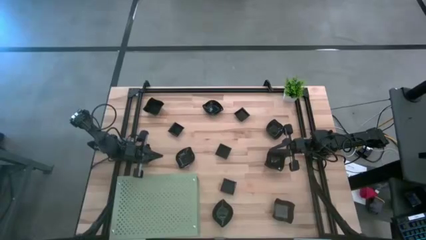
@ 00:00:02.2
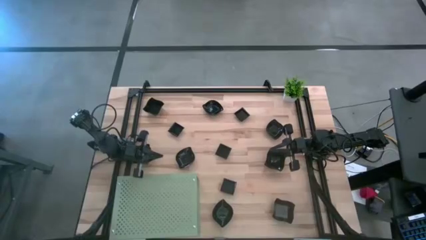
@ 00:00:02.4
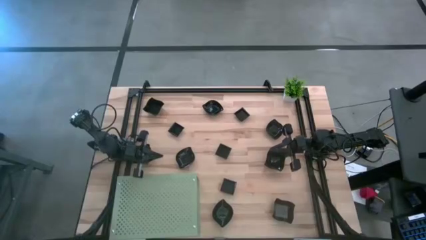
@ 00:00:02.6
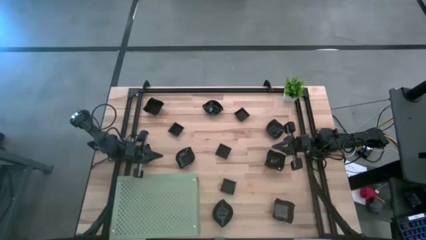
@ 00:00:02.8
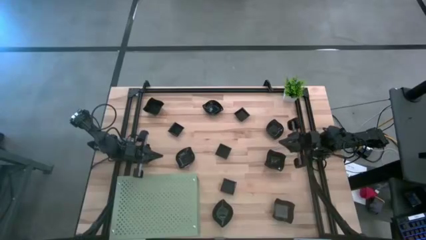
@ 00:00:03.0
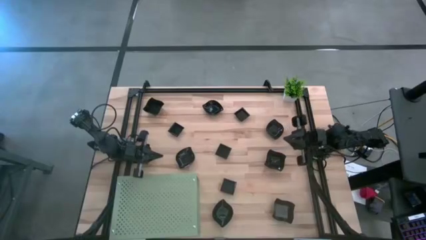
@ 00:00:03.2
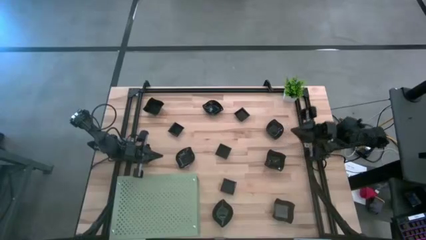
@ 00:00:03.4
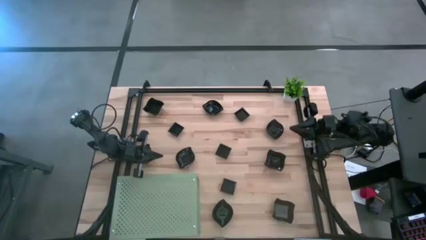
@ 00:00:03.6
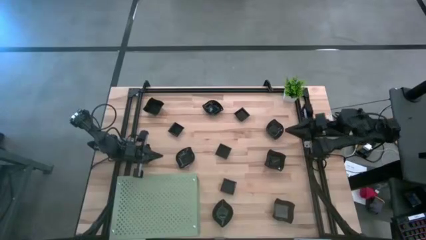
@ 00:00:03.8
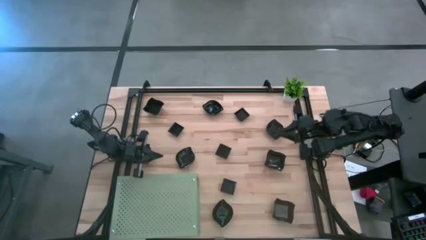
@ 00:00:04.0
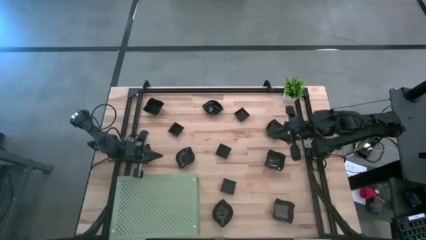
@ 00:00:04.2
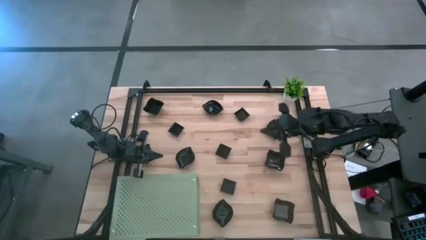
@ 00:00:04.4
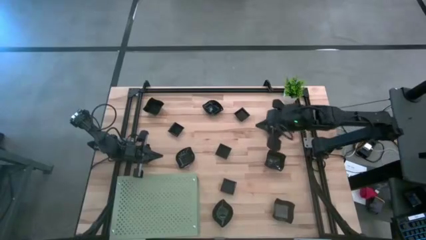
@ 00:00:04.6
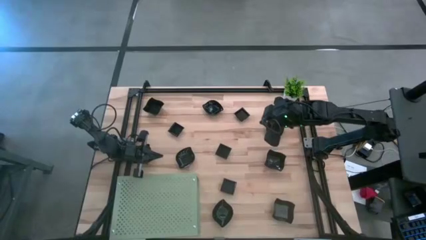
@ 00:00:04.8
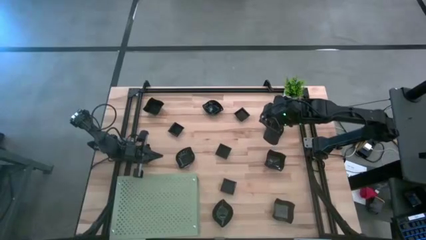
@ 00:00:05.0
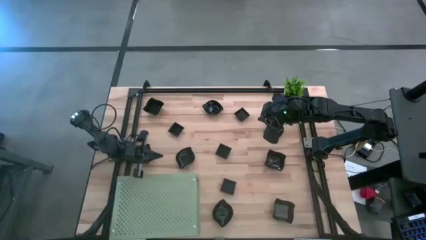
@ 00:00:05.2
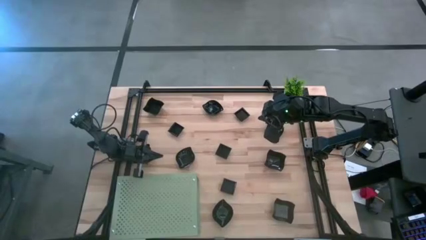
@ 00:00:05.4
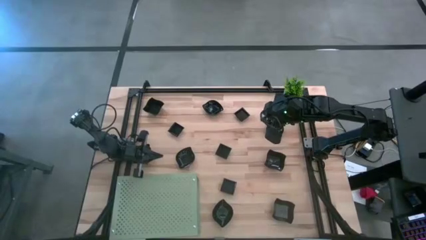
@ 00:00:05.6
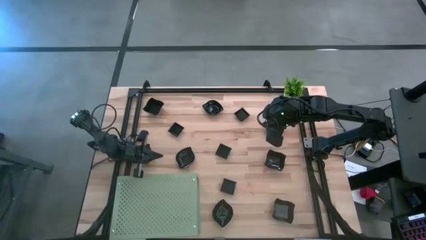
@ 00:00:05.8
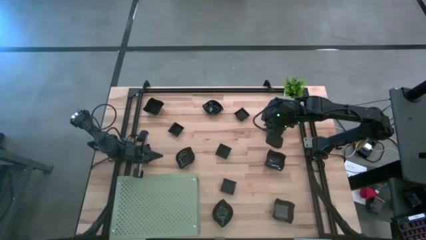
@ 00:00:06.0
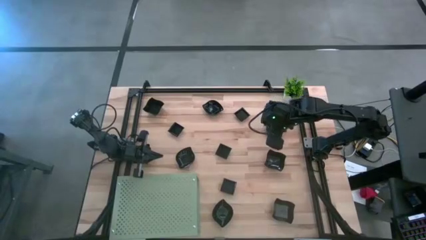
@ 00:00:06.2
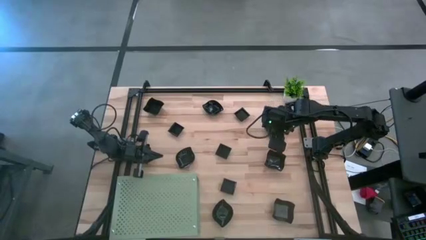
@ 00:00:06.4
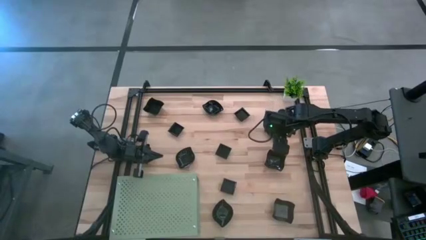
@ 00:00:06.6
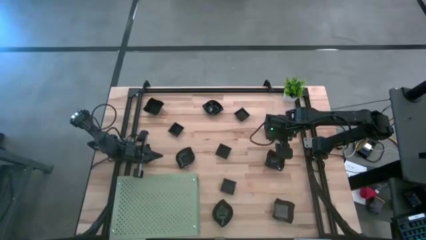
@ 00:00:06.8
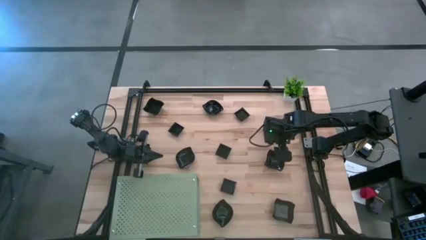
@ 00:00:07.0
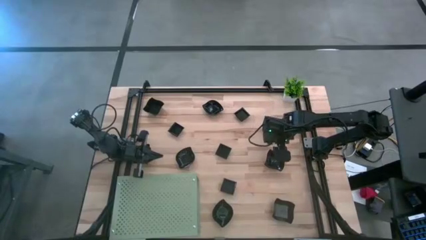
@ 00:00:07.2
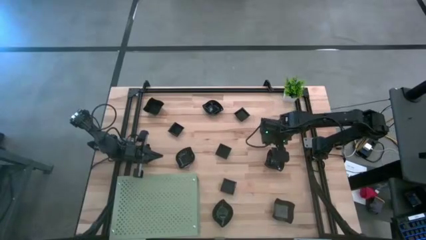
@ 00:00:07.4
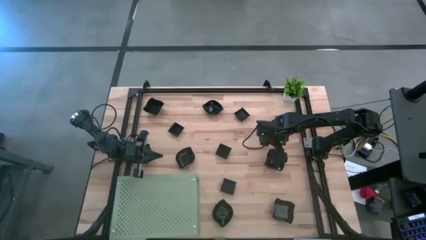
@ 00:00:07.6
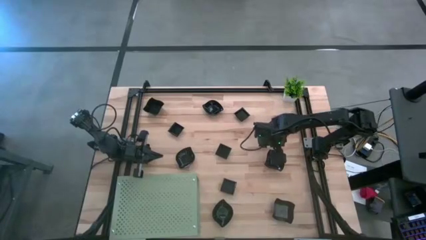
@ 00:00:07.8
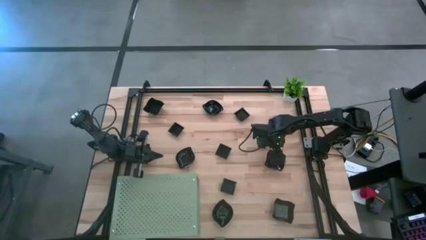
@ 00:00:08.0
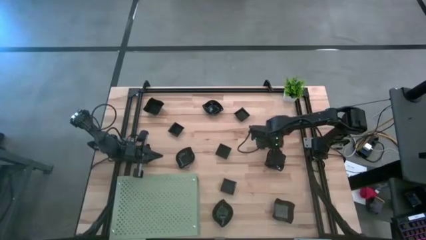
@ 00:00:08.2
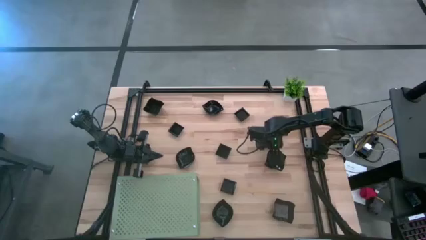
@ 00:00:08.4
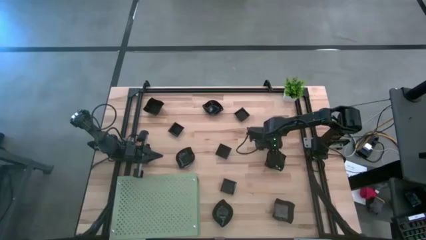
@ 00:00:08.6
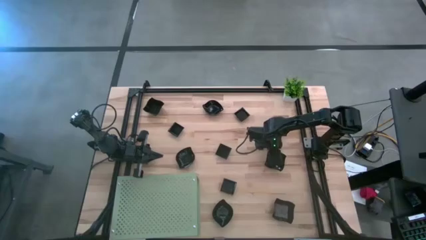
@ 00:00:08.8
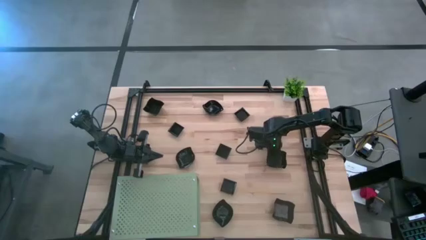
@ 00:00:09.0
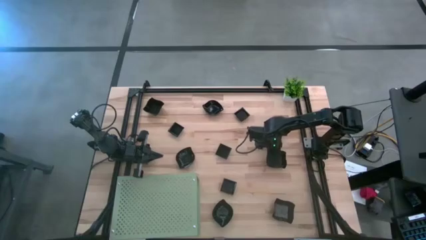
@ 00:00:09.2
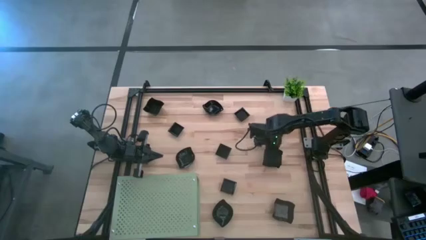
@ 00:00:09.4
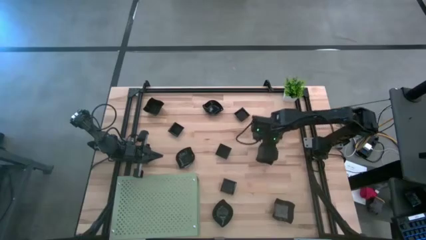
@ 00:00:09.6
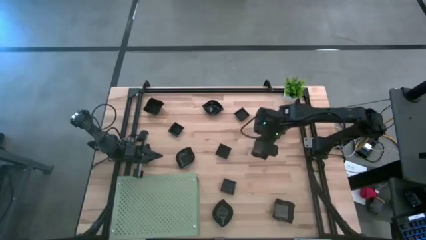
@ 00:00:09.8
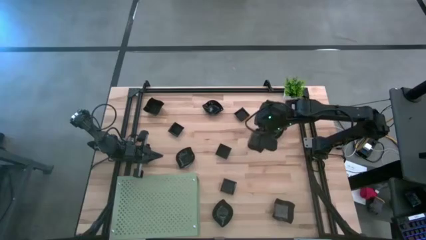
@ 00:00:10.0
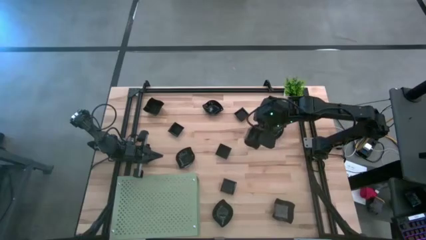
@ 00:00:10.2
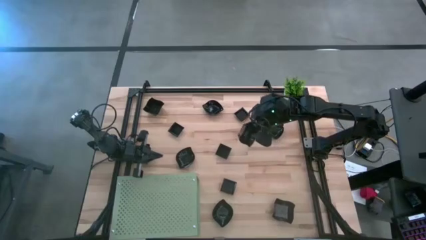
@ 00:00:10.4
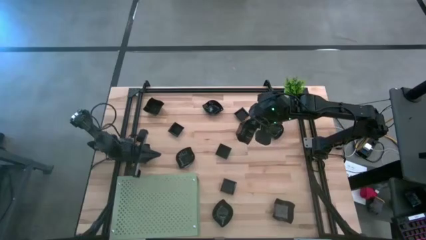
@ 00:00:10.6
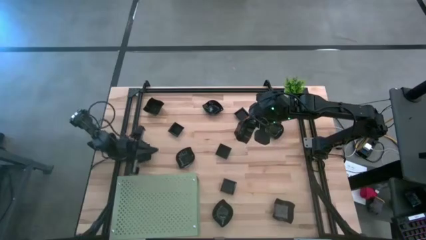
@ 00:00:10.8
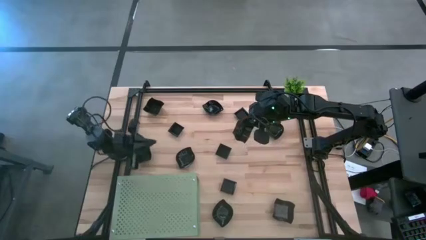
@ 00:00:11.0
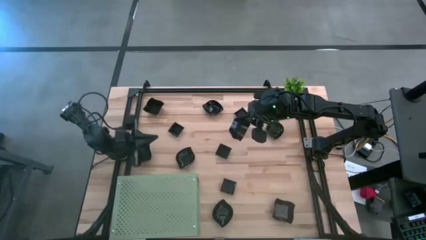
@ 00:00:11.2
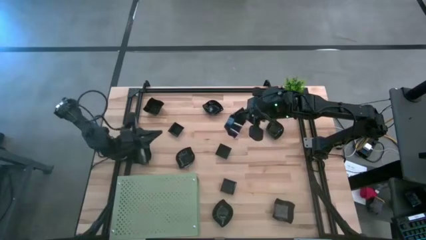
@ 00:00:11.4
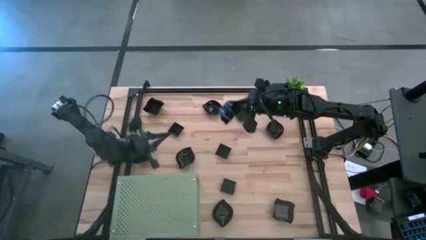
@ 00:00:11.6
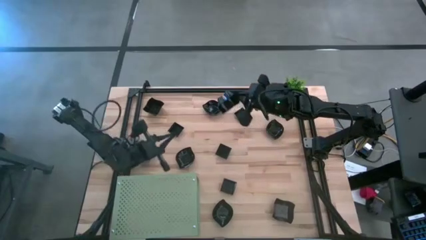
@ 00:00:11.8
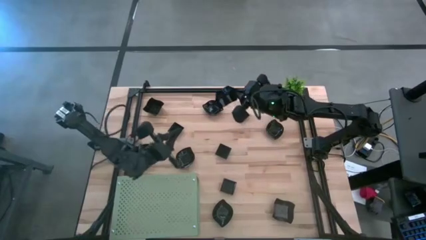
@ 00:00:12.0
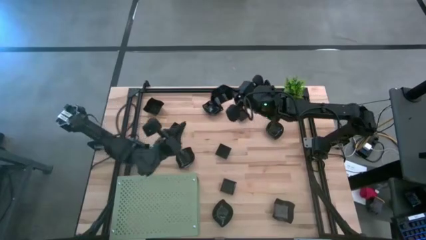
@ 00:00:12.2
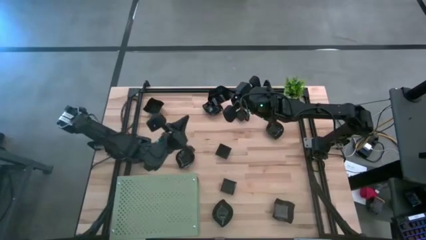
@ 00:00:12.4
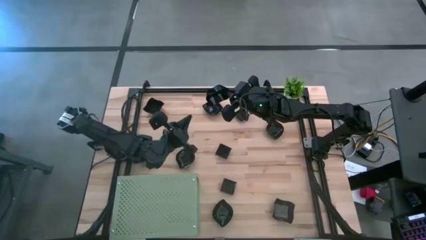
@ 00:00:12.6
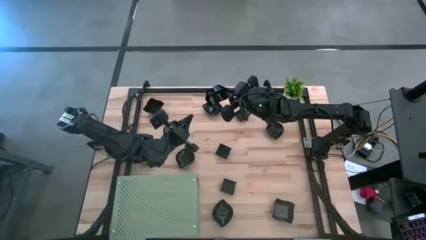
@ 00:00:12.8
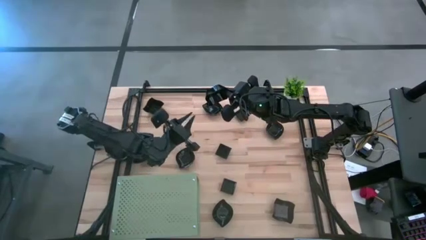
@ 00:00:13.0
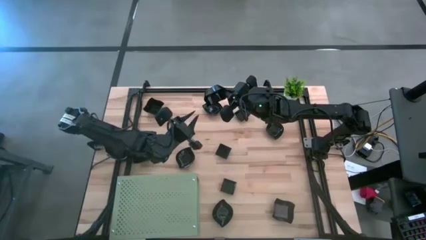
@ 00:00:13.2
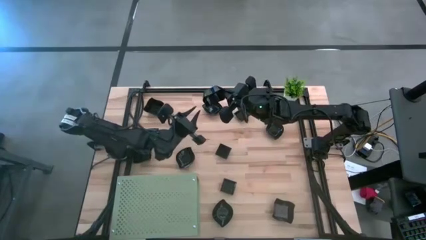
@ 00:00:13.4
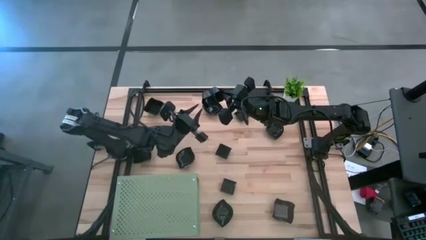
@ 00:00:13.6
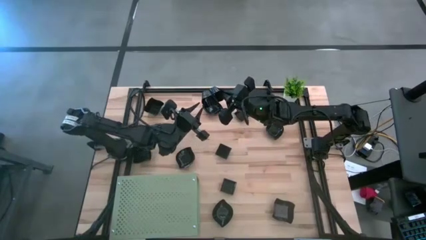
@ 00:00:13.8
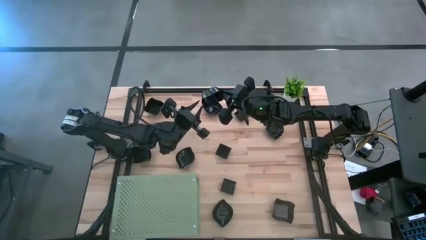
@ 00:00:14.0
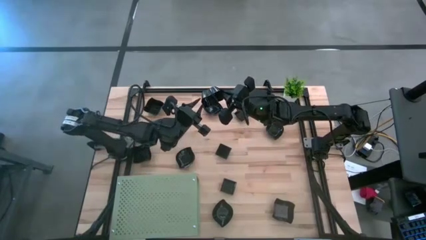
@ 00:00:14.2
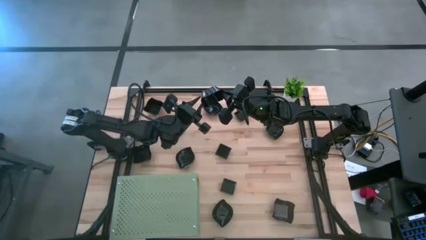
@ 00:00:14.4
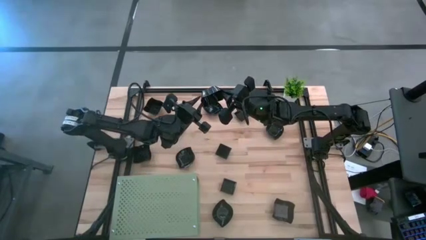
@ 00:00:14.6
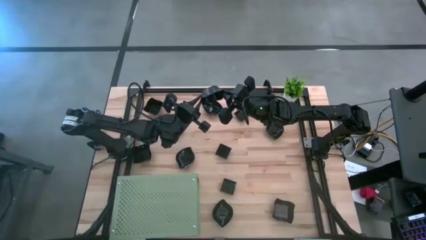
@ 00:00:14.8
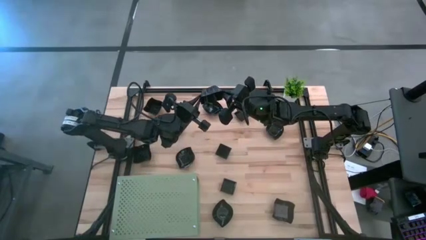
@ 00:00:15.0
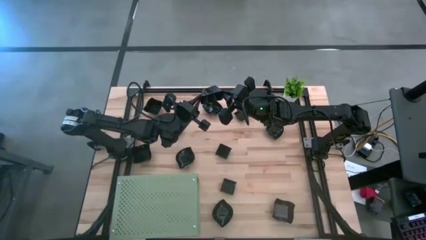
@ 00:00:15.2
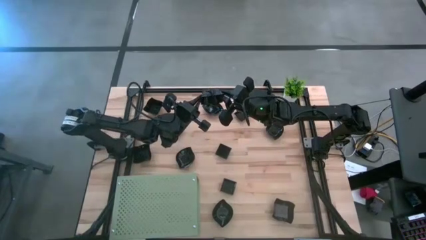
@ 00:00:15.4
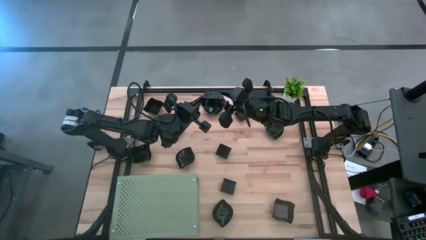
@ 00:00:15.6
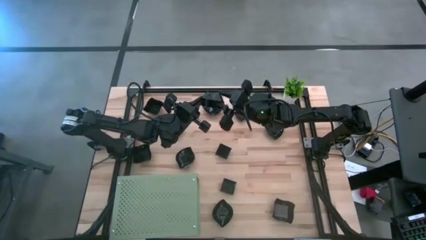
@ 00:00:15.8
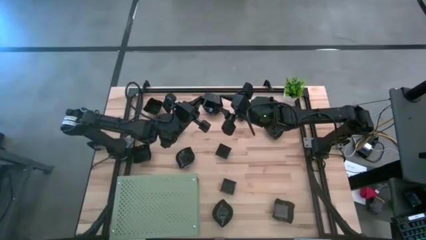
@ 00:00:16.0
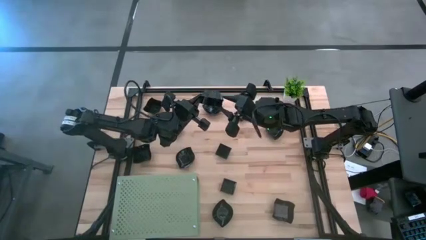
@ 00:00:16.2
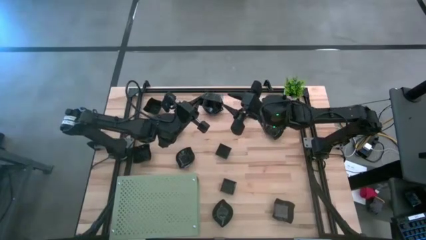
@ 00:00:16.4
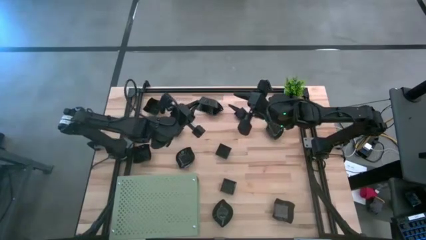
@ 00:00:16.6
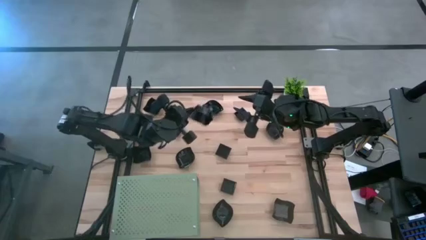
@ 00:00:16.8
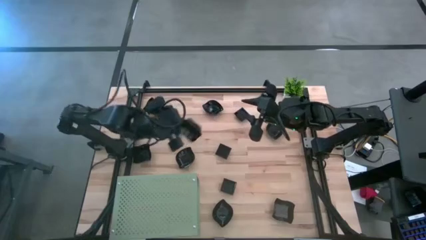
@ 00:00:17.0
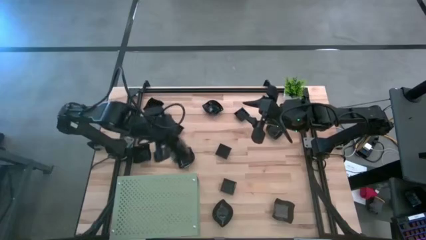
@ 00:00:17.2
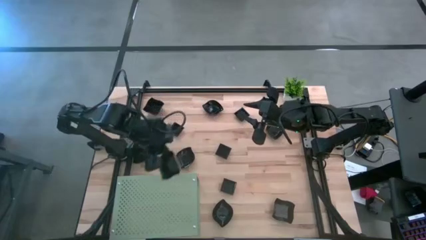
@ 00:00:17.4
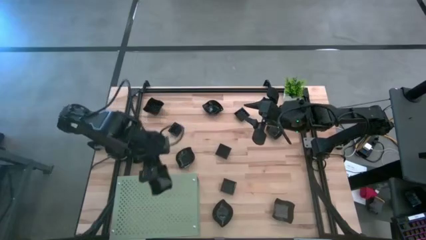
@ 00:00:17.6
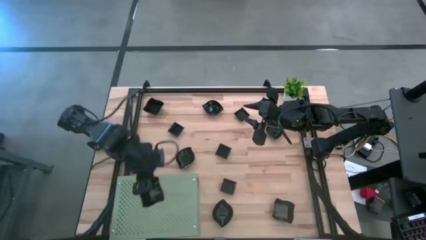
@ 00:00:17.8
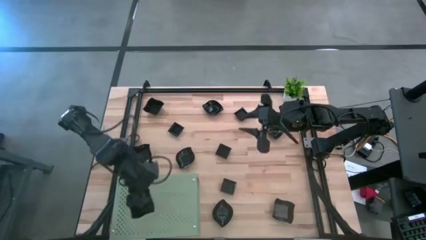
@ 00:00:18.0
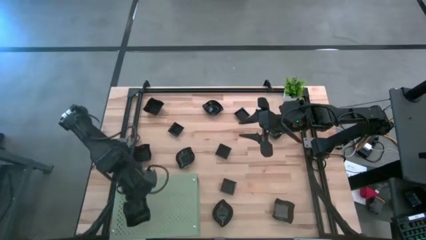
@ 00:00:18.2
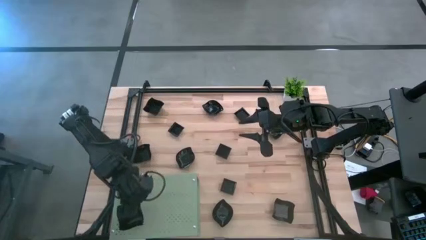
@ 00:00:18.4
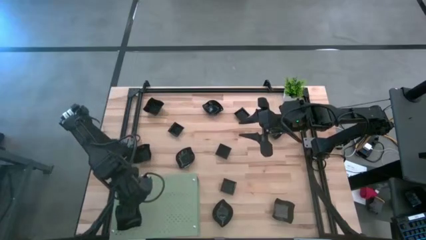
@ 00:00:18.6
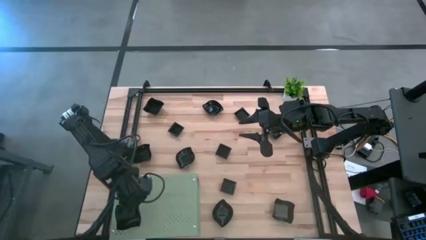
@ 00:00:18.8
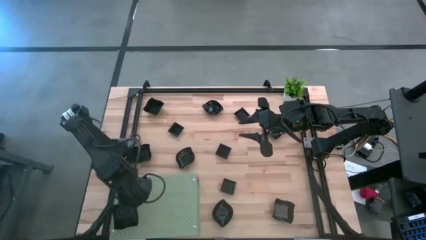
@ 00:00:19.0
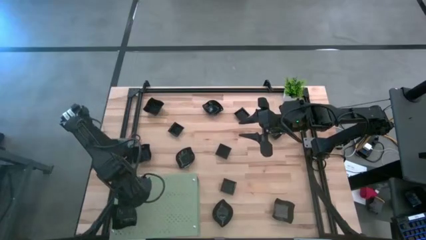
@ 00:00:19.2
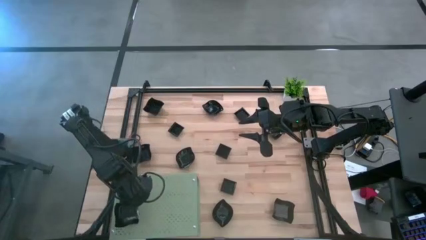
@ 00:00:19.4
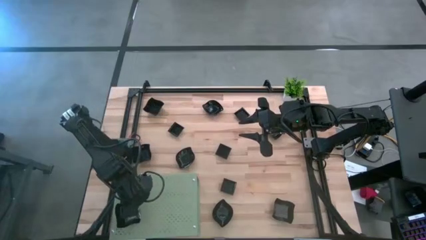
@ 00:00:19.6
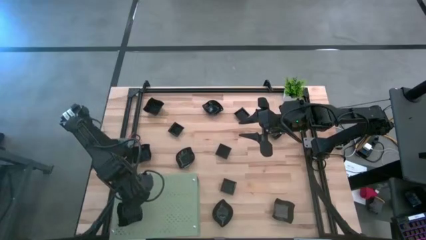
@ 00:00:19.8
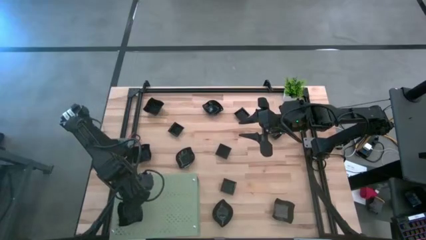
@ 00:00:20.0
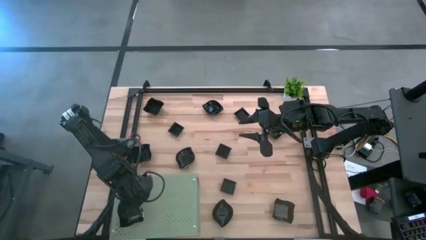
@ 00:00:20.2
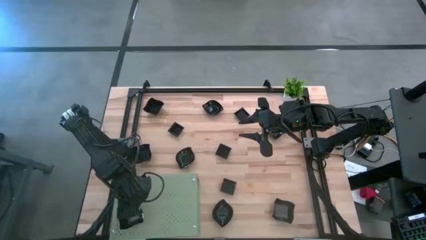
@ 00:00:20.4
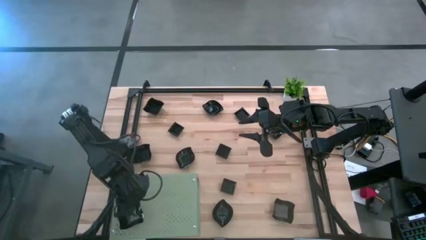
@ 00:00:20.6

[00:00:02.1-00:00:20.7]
Task: Pick & Place Mini shaped plates
Put the black distorted square plate on the shelf
